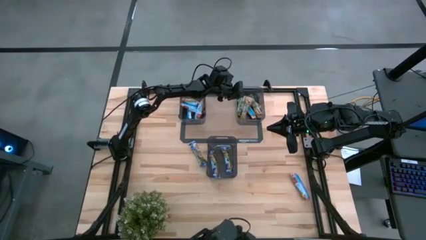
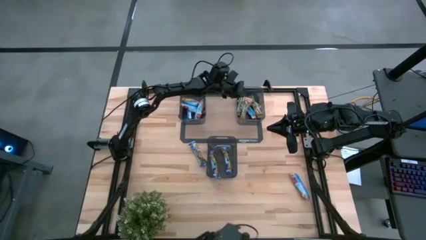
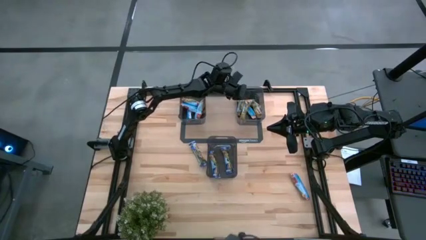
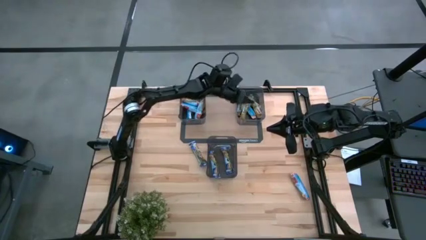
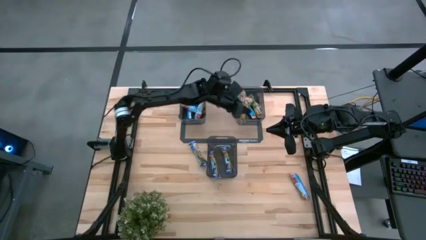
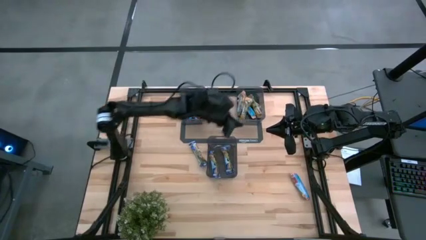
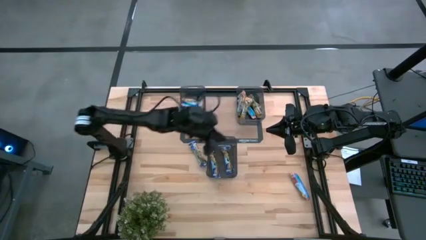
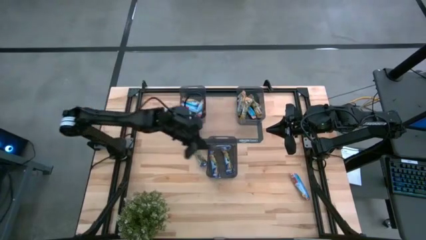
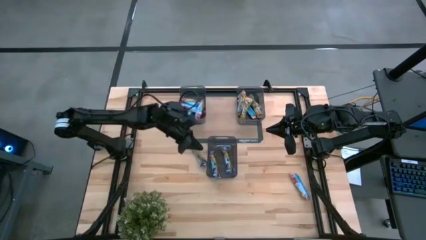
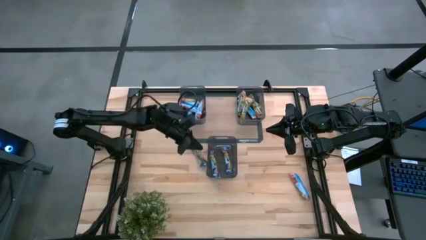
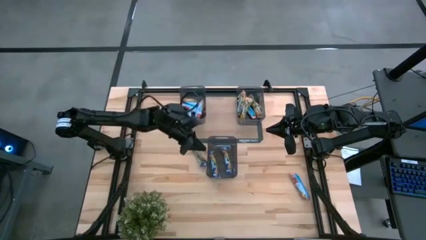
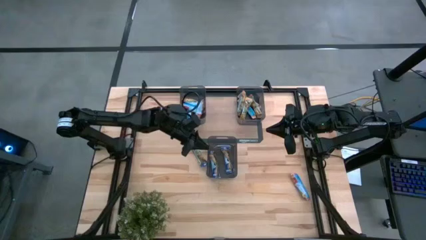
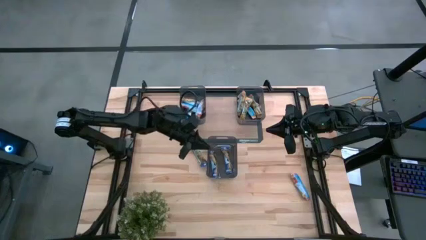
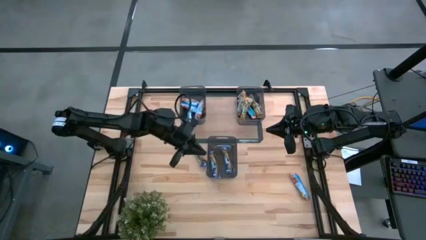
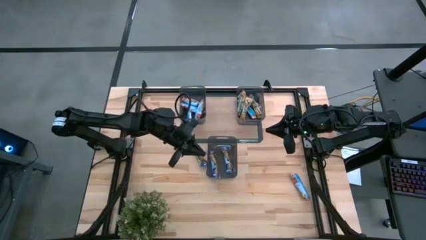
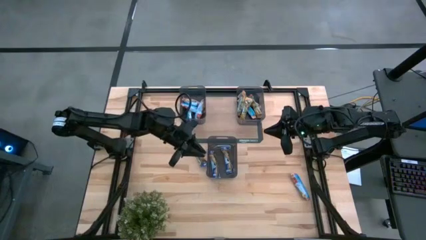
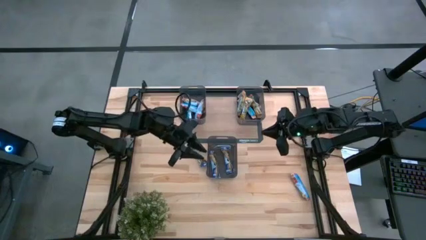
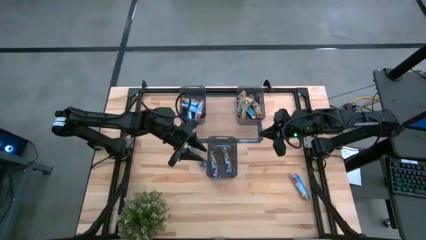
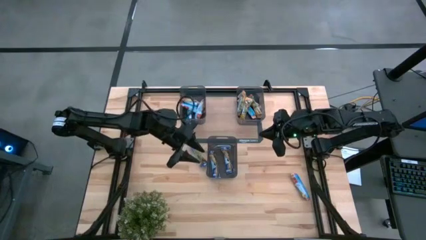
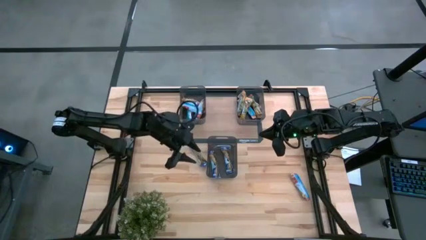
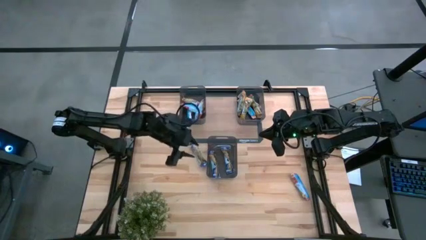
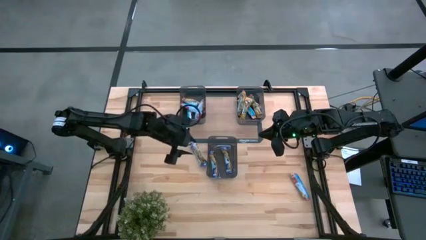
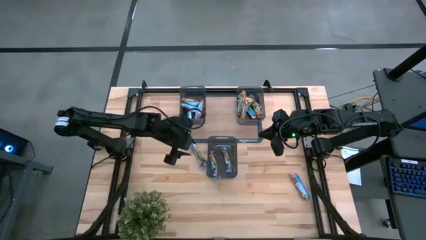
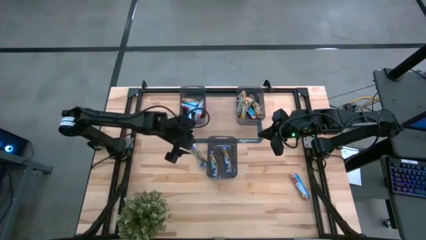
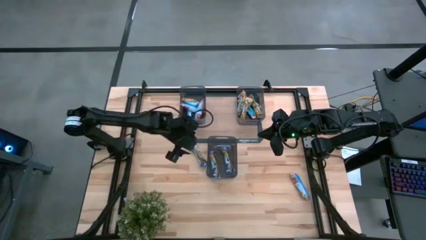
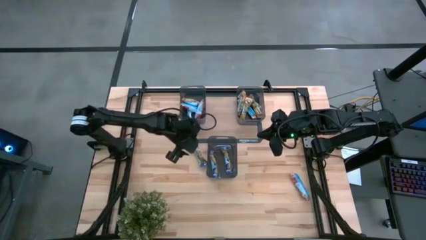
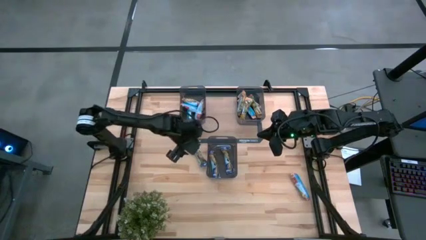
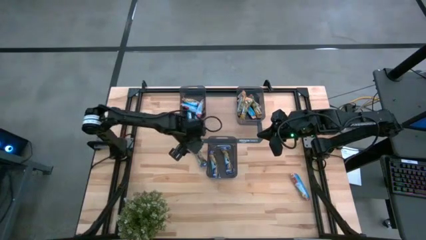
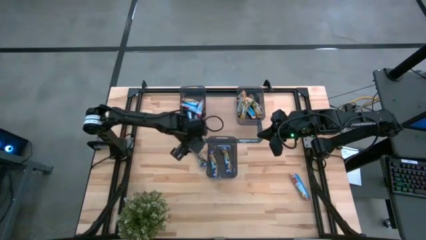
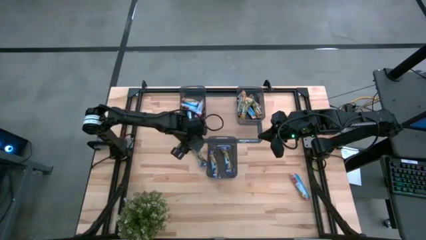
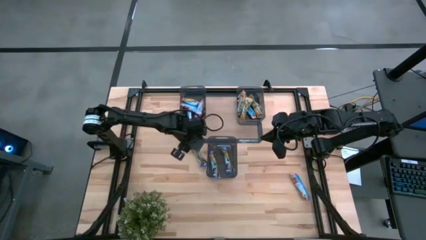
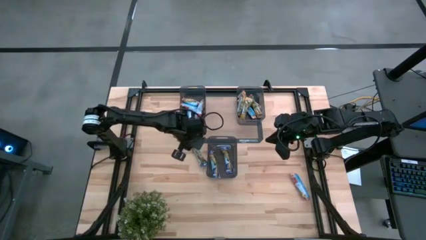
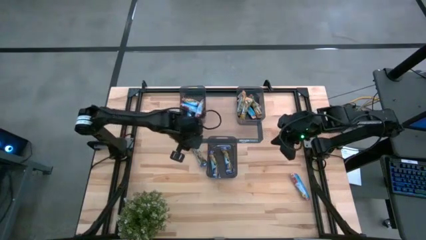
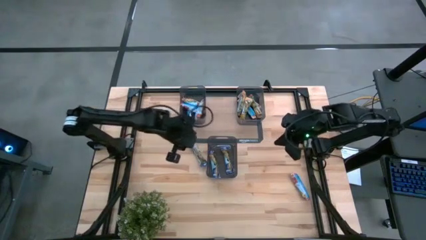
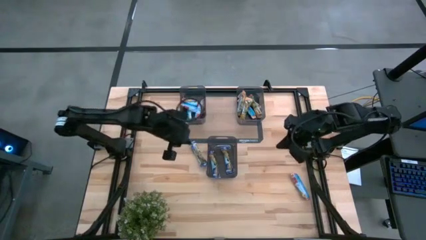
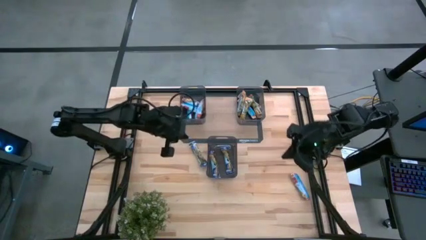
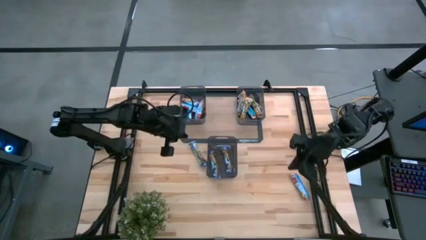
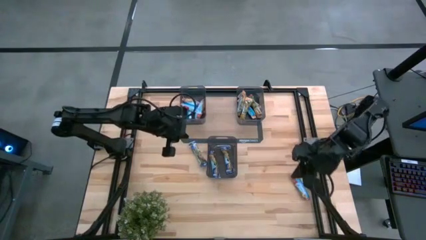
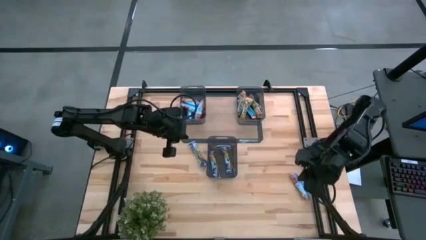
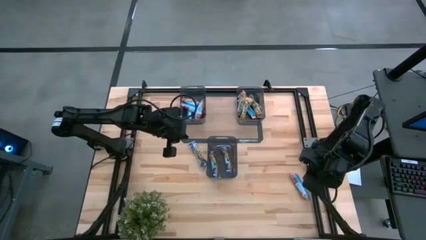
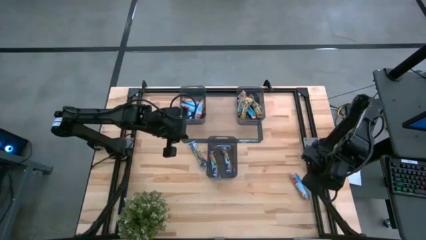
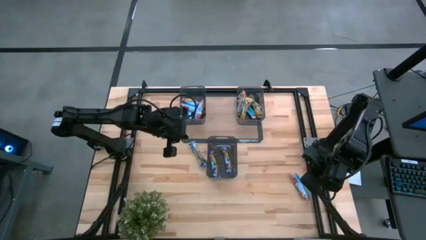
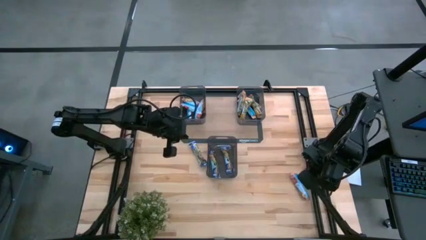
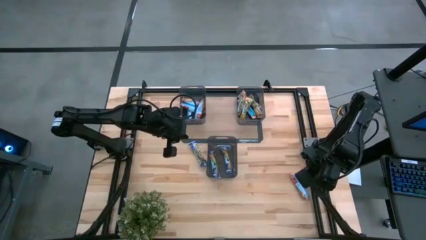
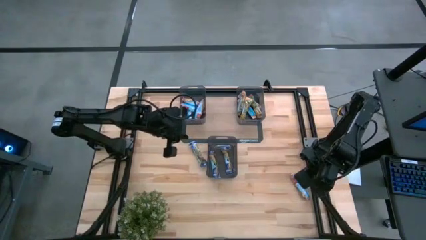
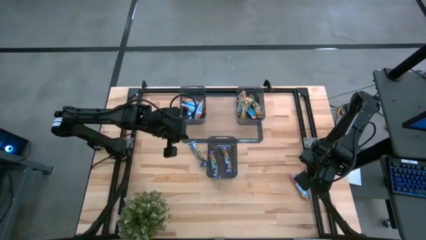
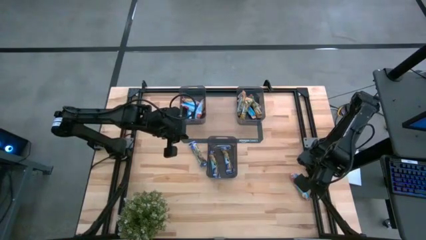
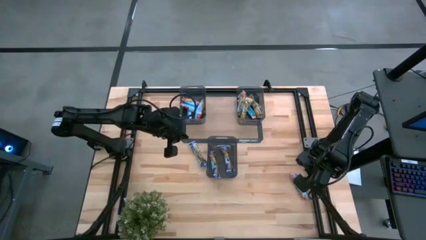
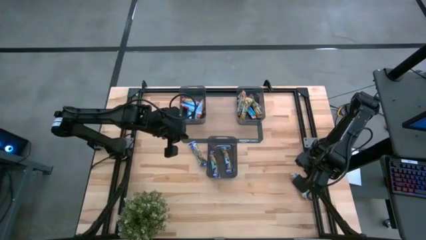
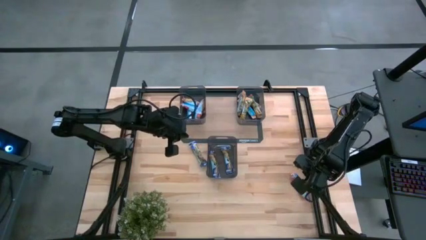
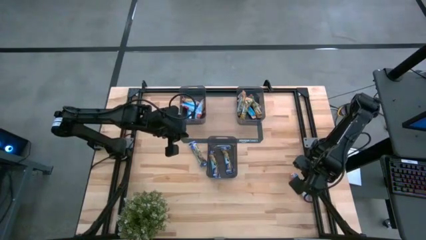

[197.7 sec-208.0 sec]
Task: Pick and place Granola Bars by type
Put the red granola bar into the left black bin

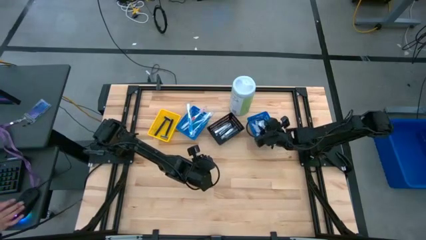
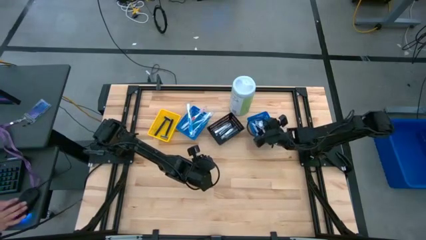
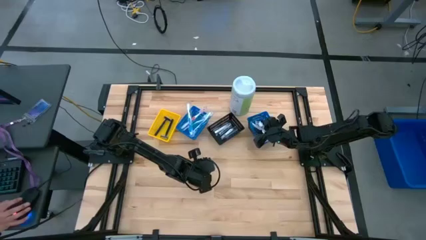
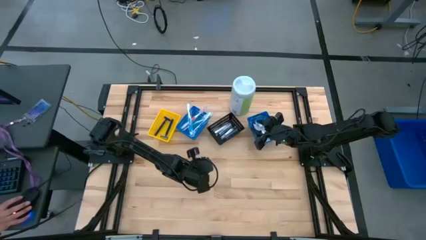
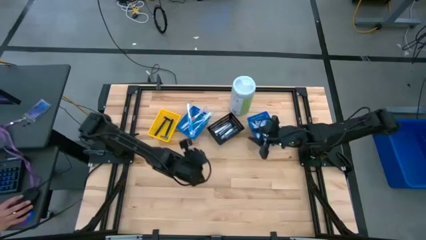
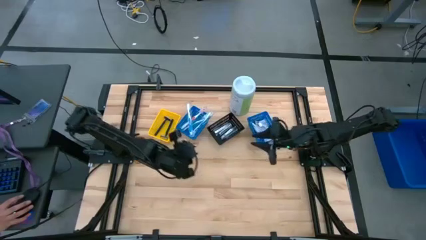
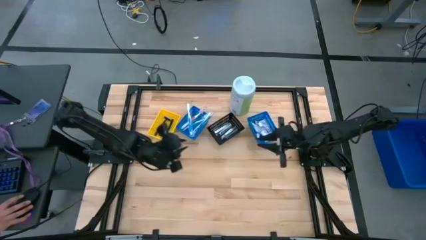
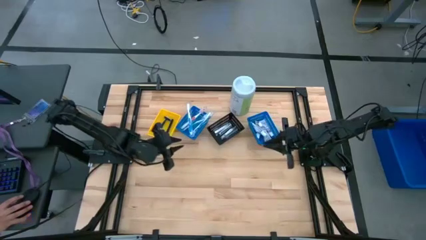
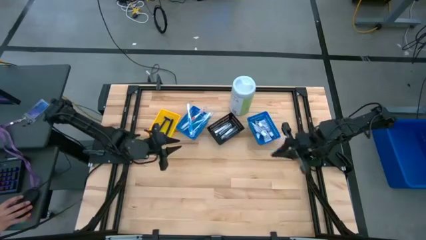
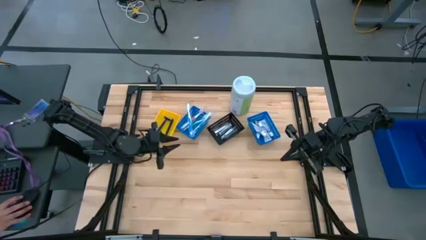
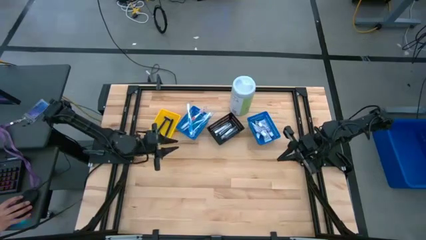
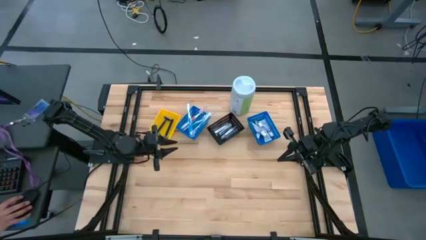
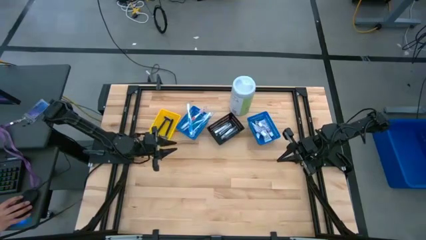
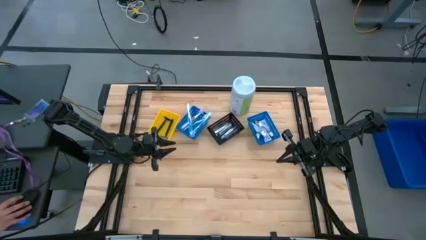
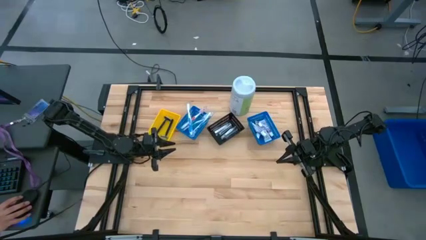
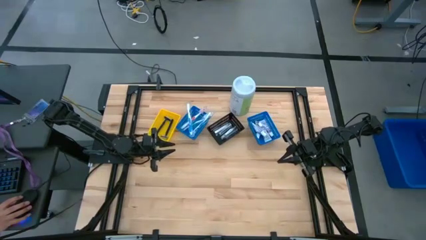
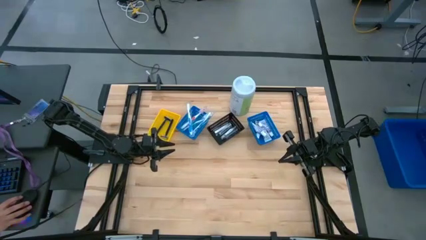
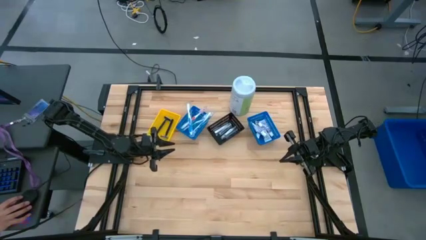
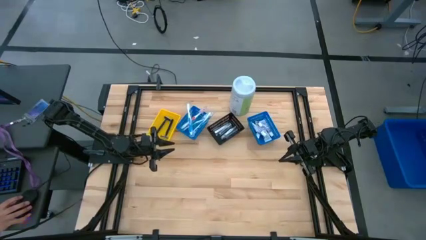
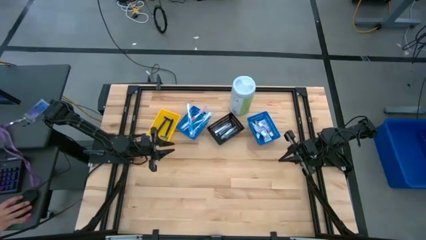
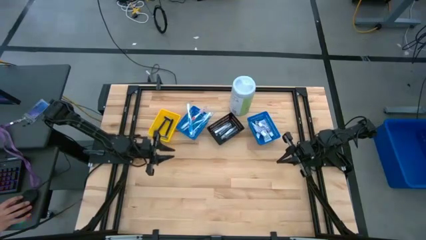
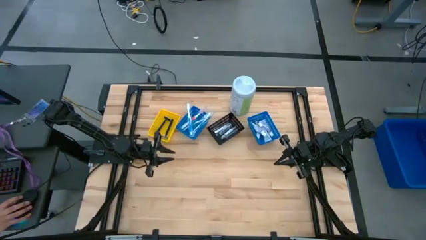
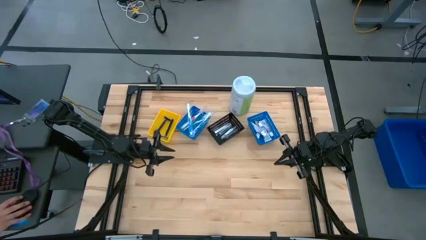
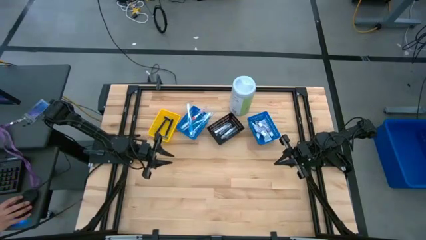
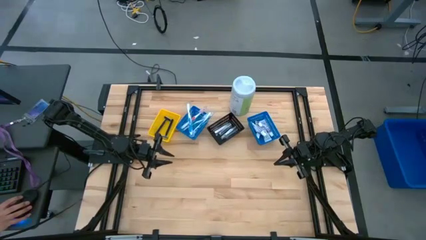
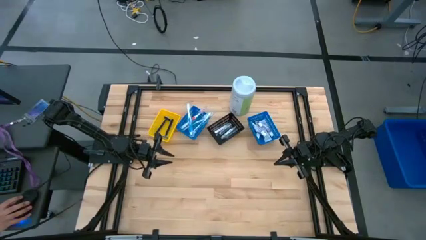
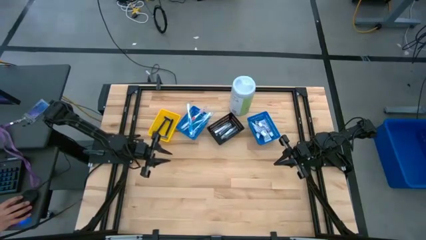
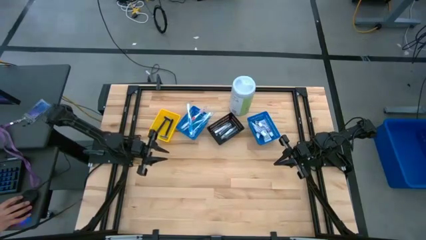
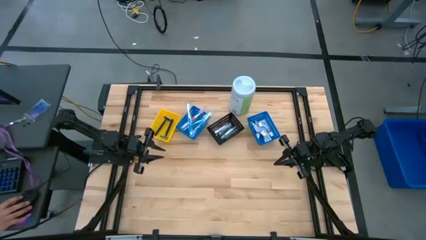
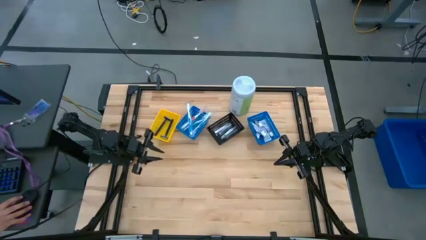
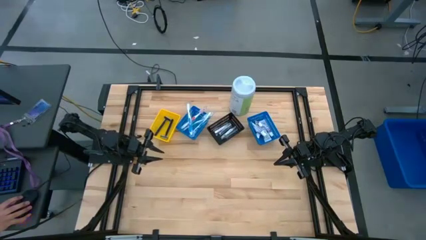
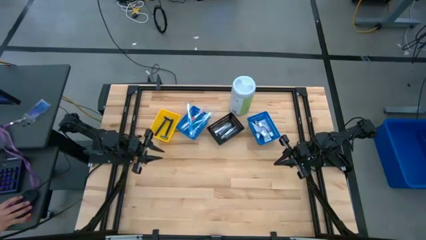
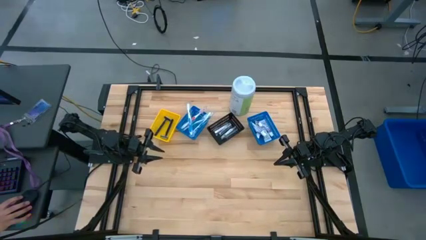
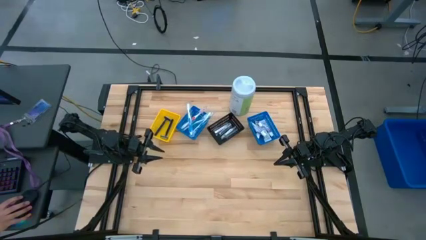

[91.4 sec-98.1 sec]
Task: Pick & Place Travel size toiletries
Return to Home Position
